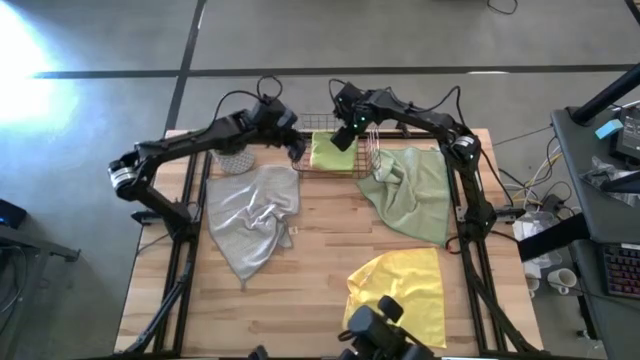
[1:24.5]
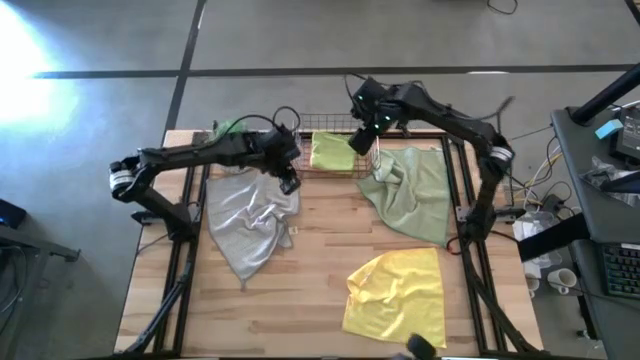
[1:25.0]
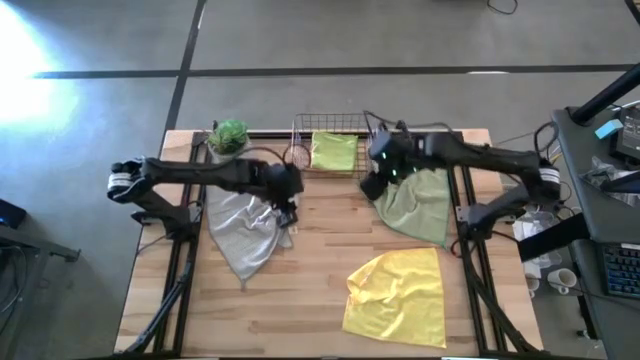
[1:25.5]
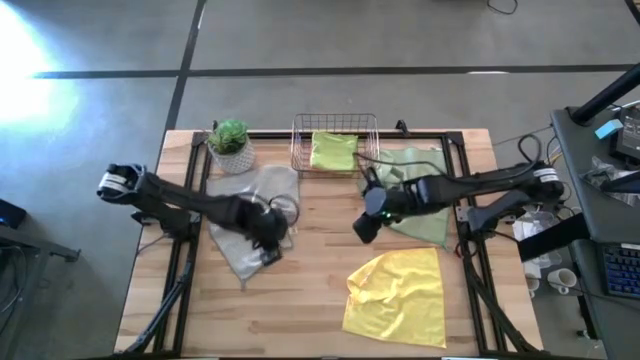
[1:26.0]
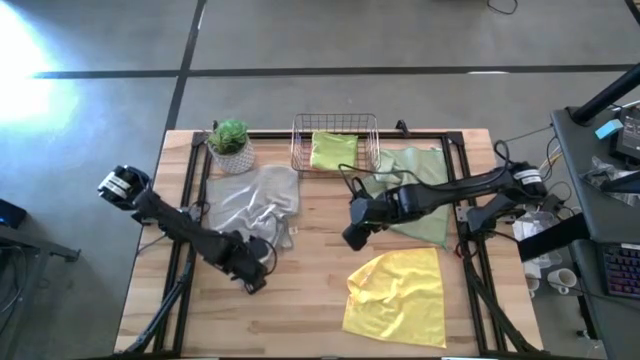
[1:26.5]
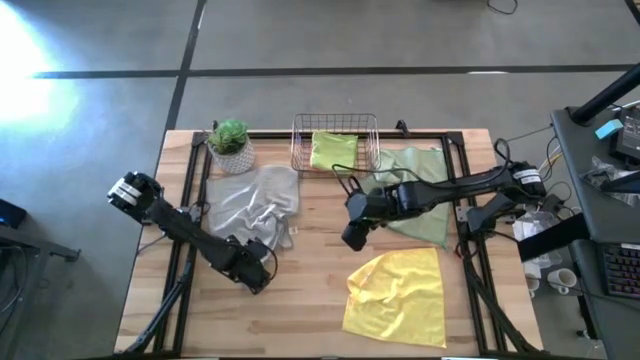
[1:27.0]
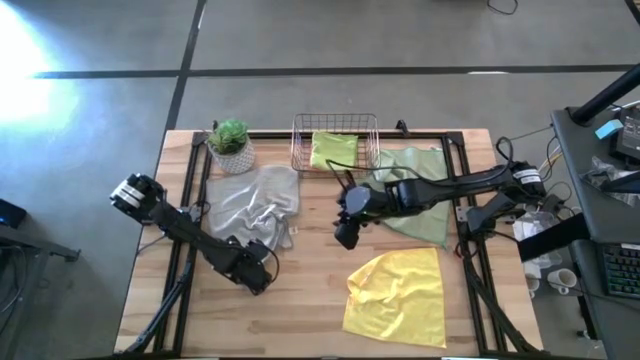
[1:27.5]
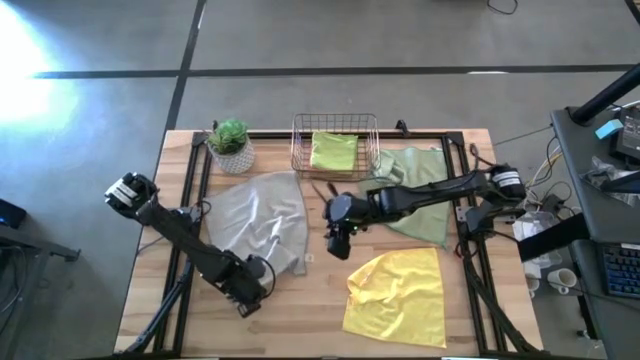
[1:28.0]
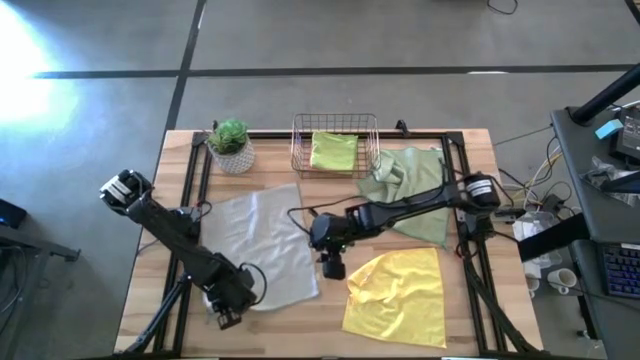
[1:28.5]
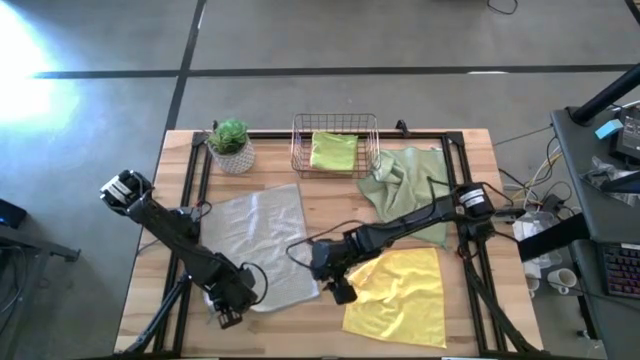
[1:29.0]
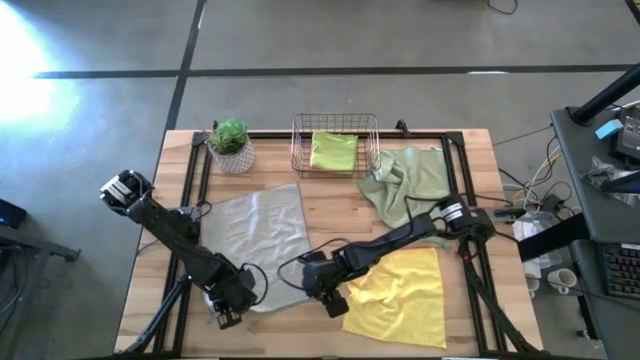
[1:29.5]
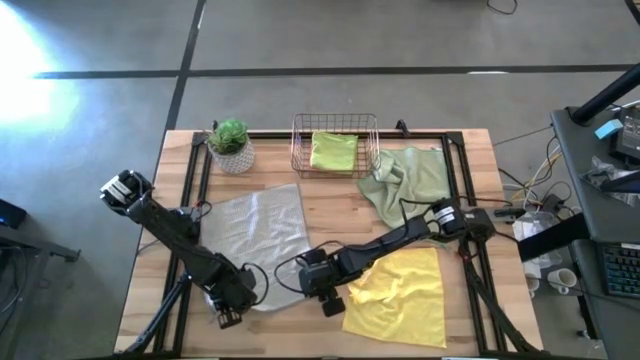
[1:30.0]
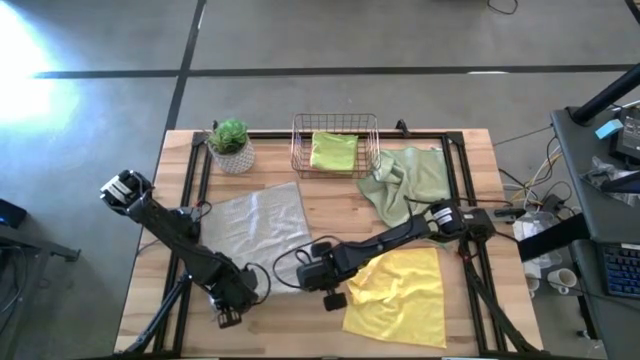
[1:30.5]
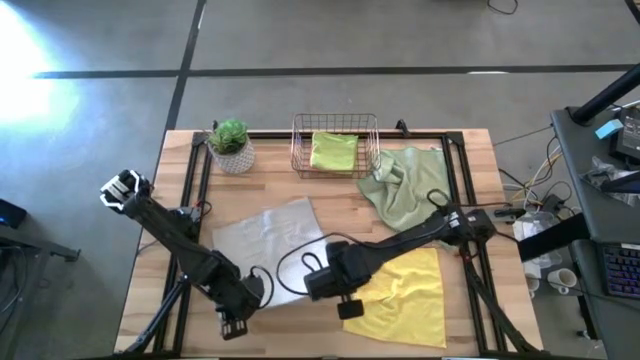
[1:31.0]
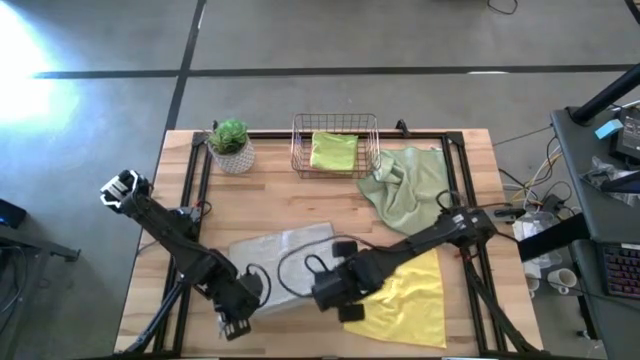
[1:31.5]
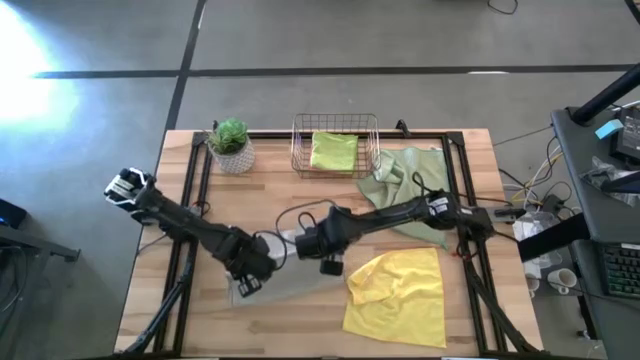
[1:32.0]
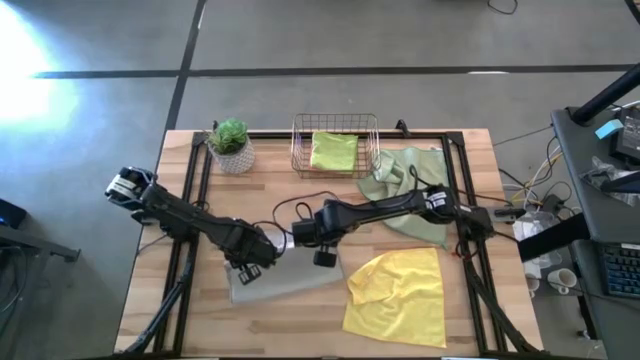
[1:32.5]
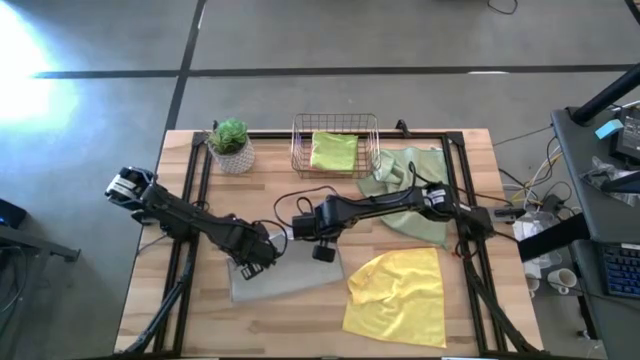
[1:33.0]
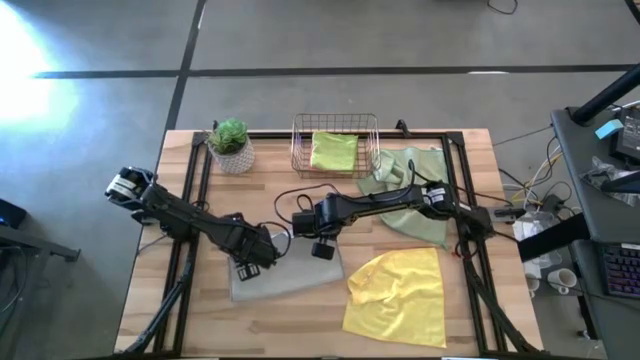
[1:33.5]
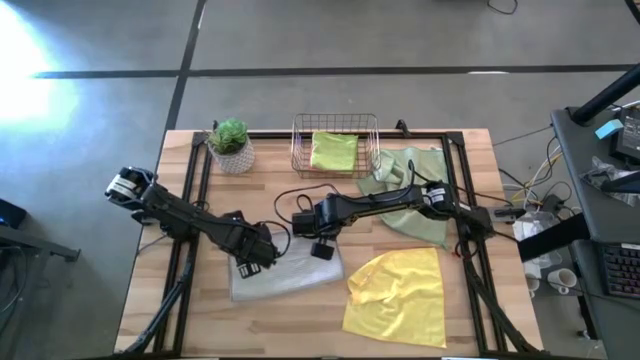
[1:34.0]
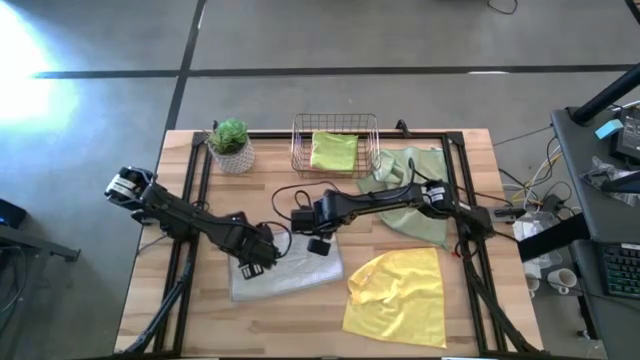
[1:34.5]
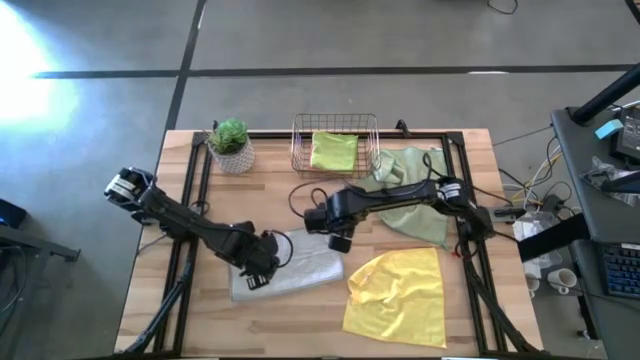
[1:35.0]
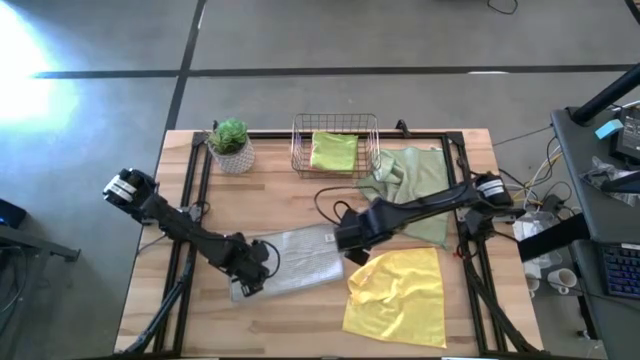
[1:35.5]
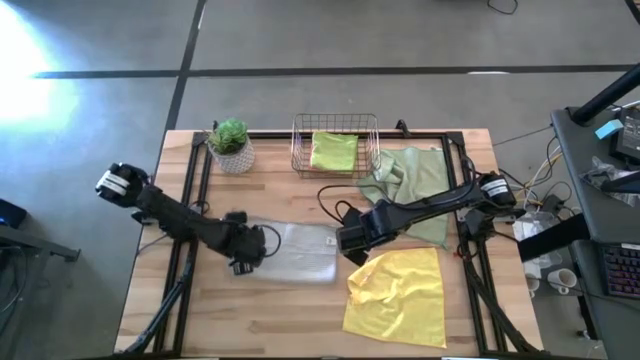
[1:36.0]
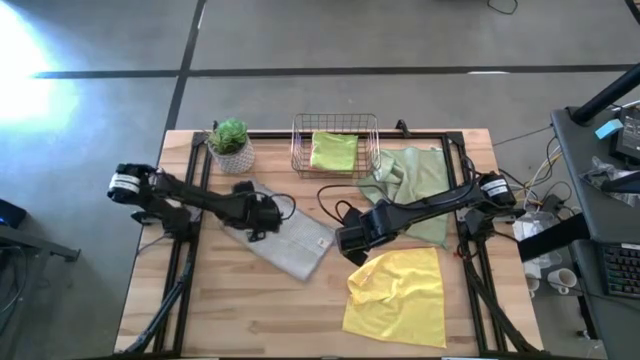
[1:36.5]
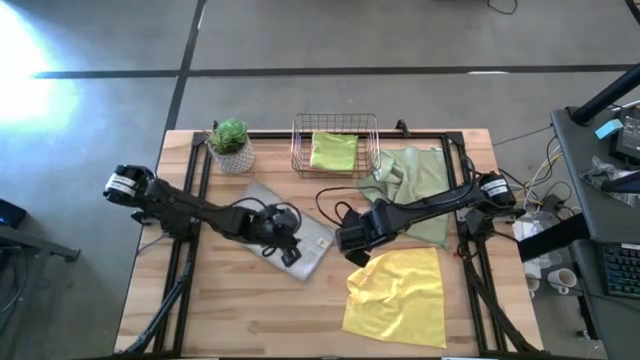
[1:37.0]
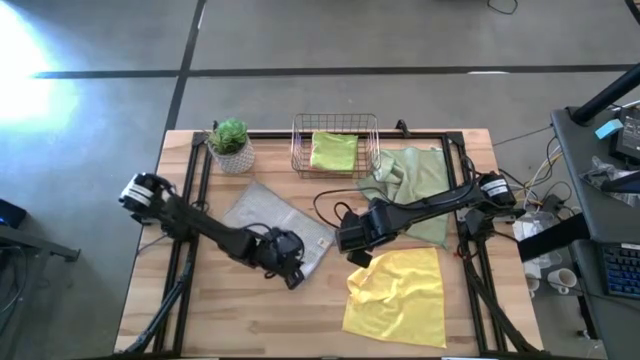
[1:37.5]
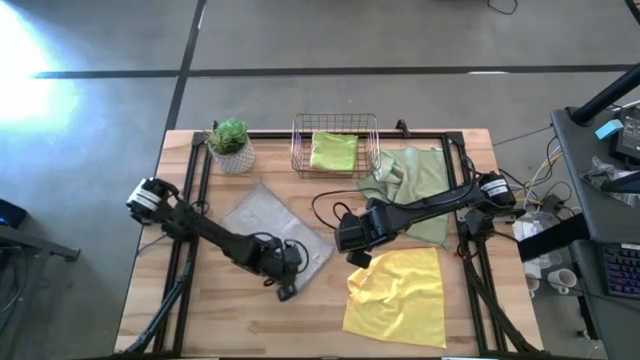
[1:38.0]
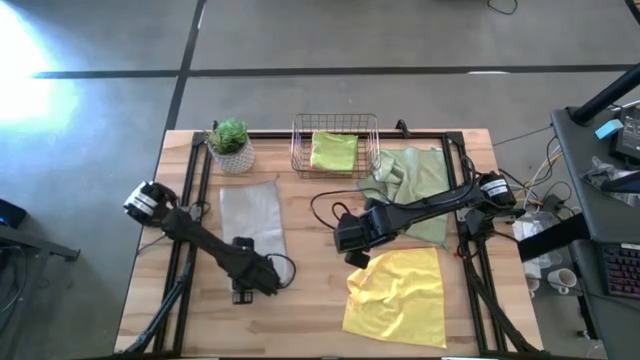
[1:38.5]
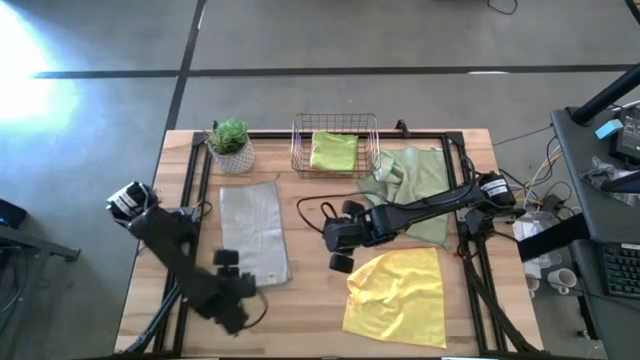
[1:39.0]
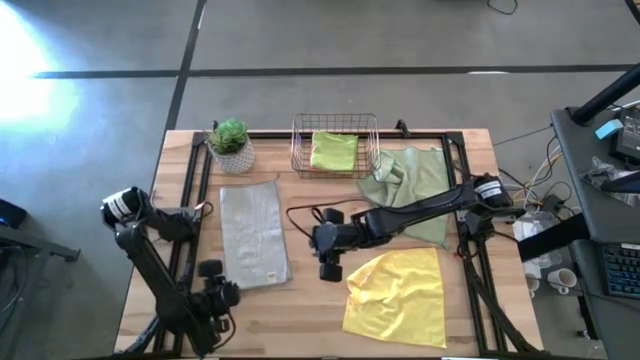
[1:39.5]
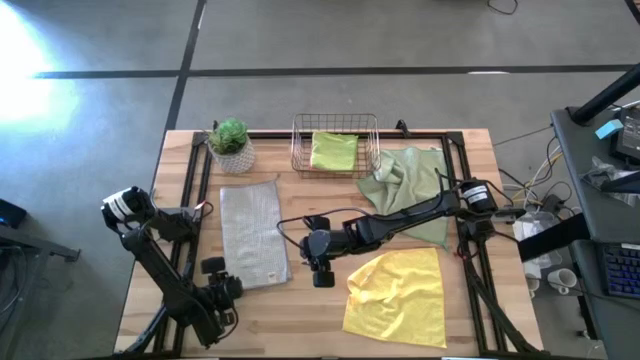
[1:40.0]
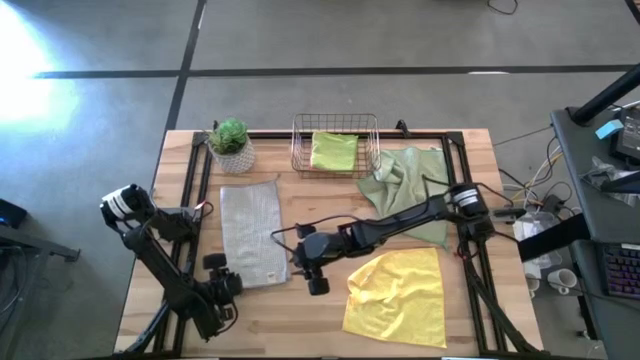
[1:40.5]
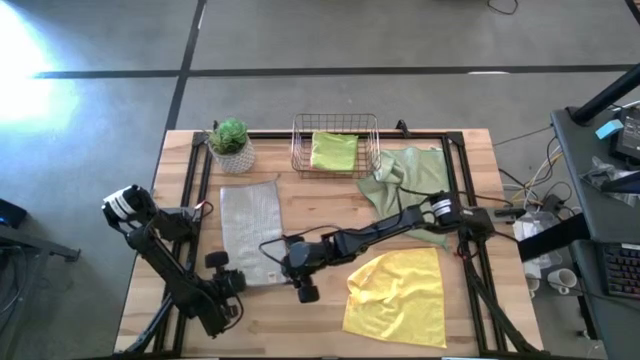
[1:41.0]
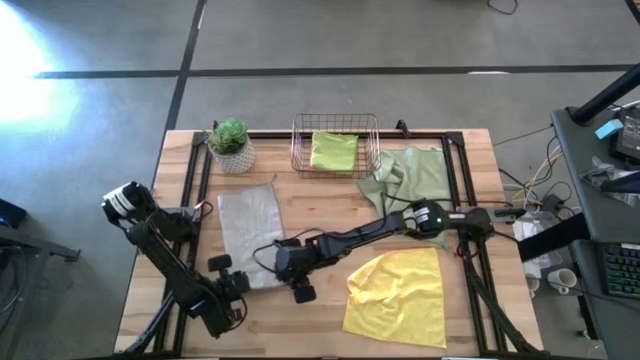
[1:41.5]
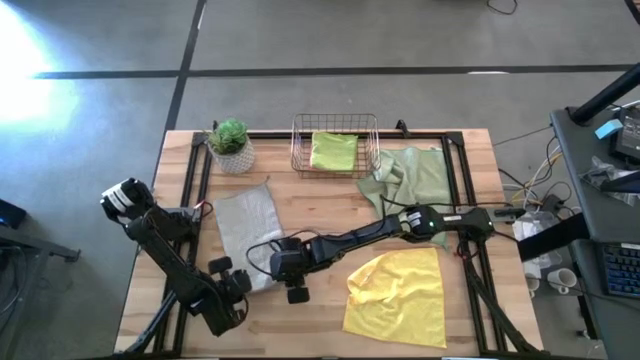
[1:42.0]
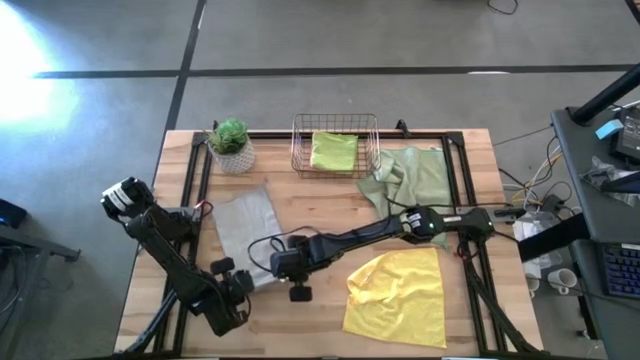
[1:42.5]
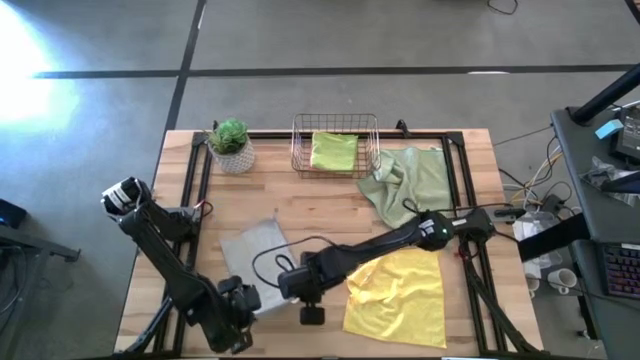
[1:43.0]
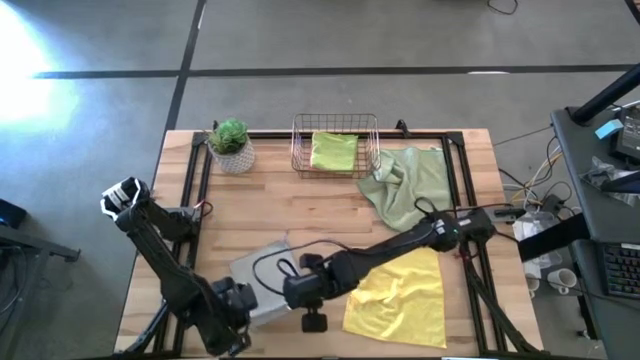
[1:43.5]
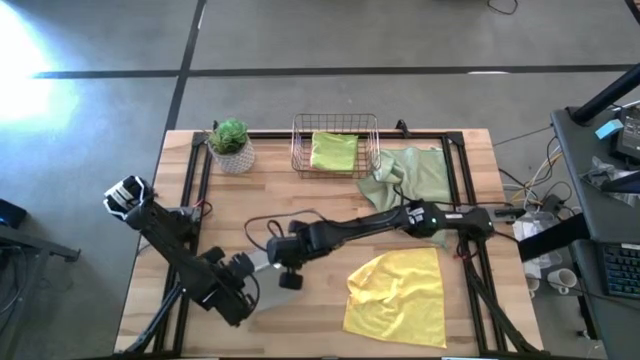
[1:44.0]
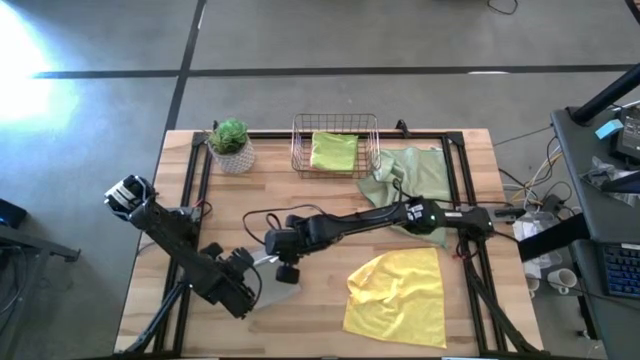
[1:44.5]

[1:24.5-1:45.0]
Task: Fold microfiber towels
Fold the gray towel

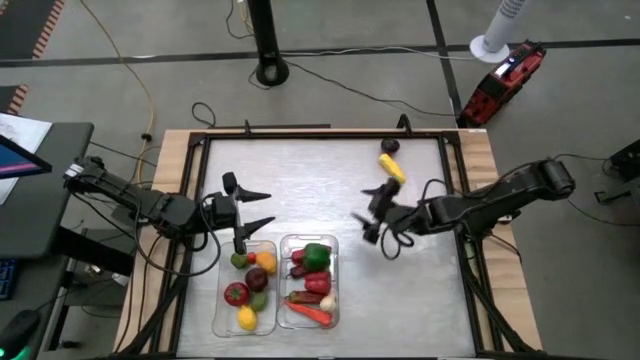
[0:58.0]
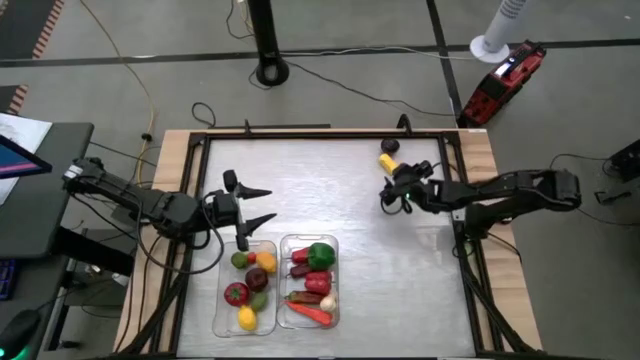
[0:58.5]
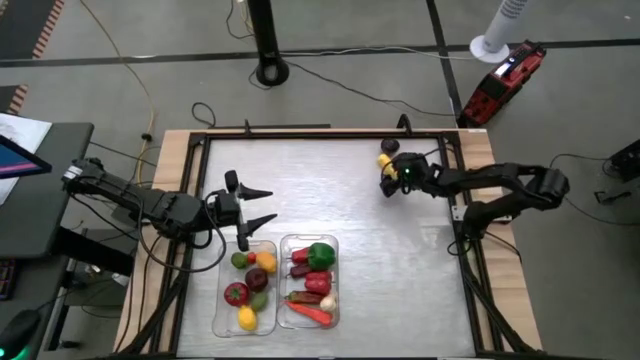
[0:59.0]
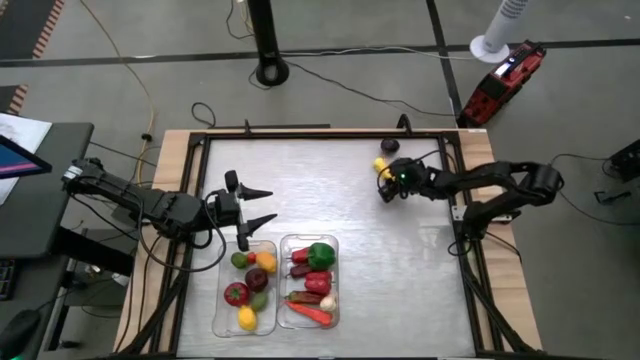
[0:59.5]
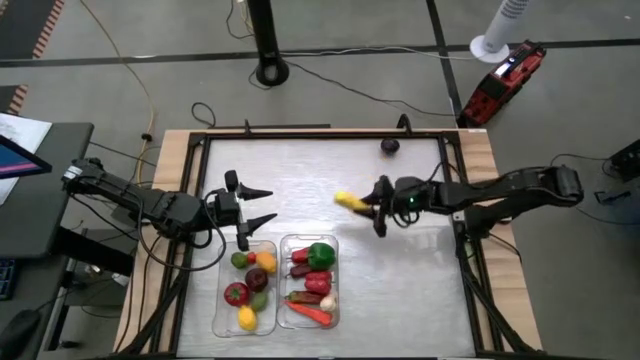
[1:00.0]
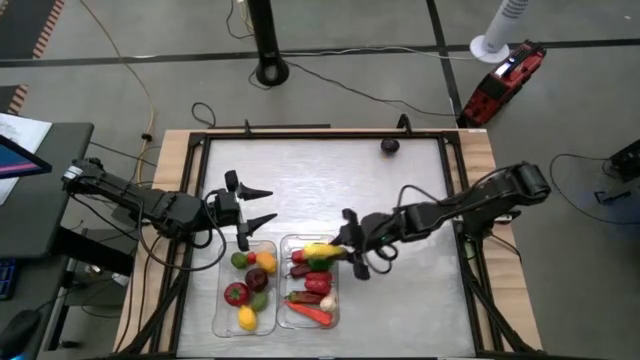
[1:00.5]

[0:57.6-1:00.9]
Task: Sort produce into baskets
Put the yellow corn into the right transparent bin
